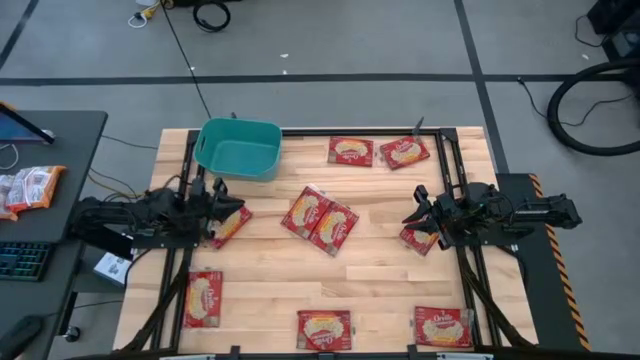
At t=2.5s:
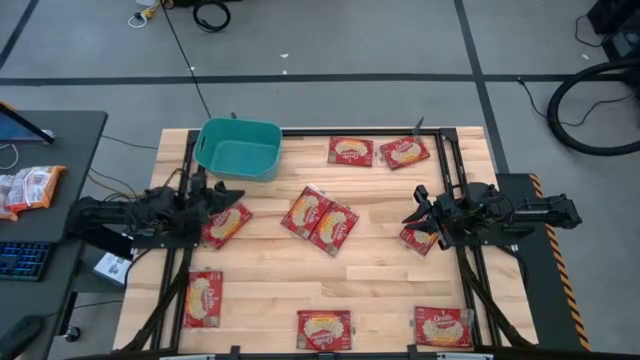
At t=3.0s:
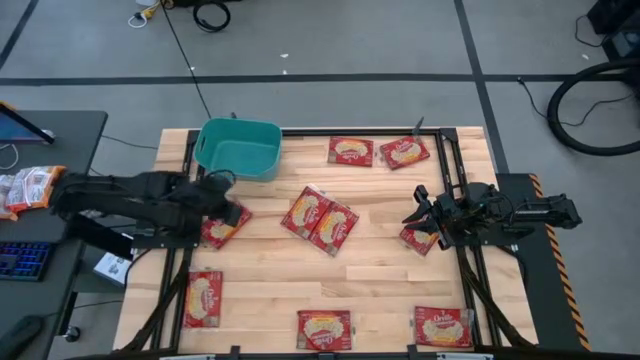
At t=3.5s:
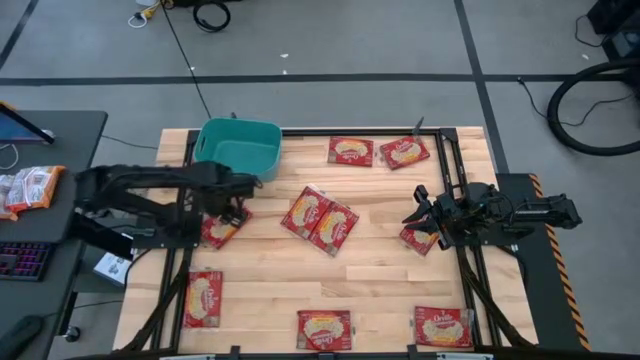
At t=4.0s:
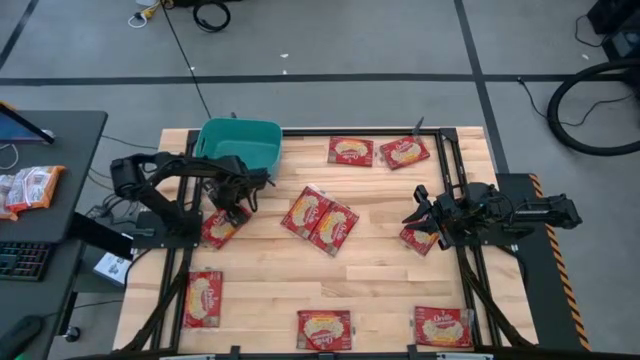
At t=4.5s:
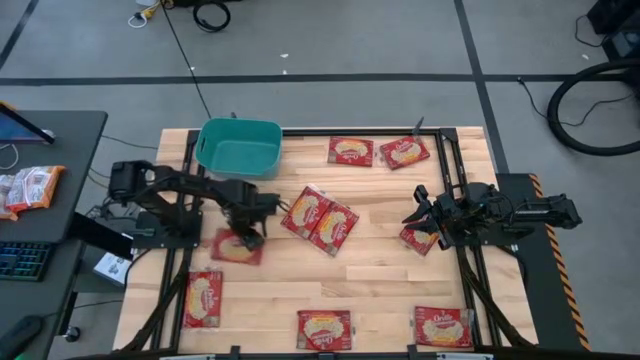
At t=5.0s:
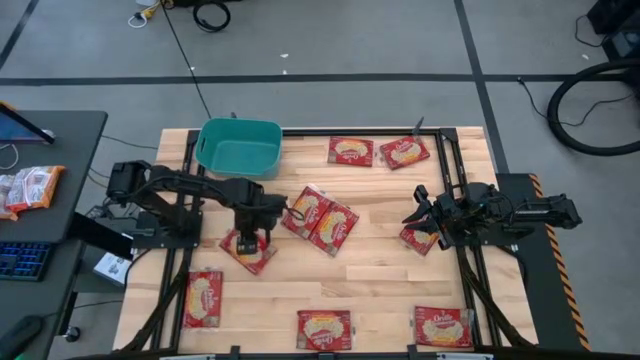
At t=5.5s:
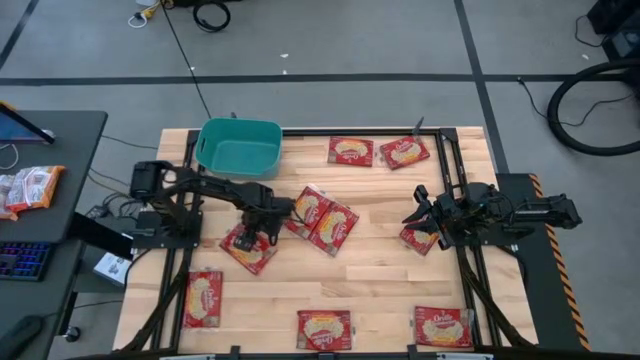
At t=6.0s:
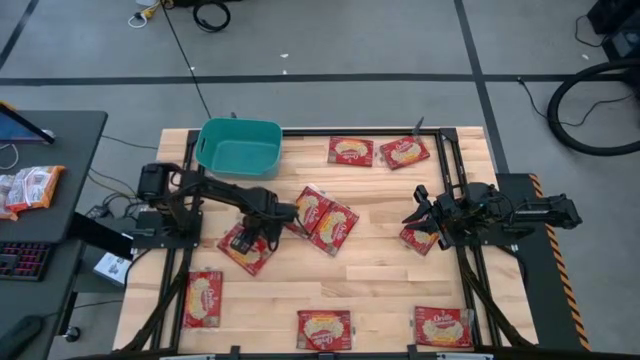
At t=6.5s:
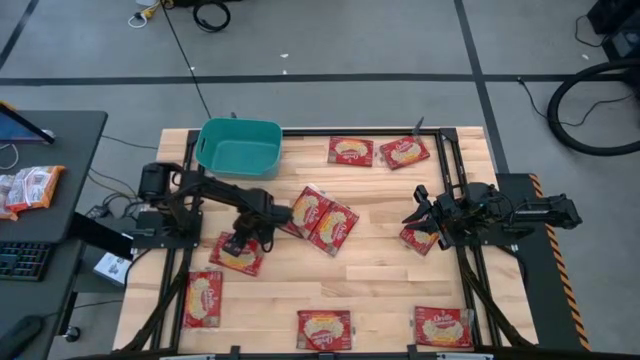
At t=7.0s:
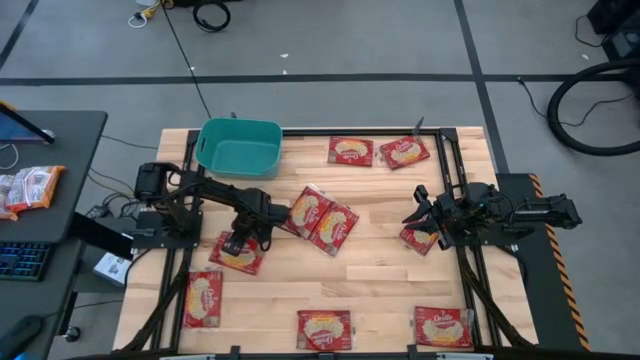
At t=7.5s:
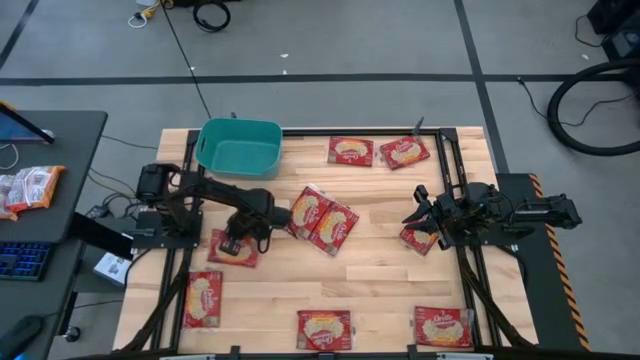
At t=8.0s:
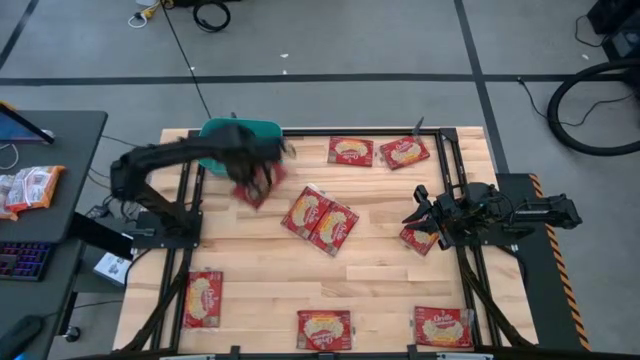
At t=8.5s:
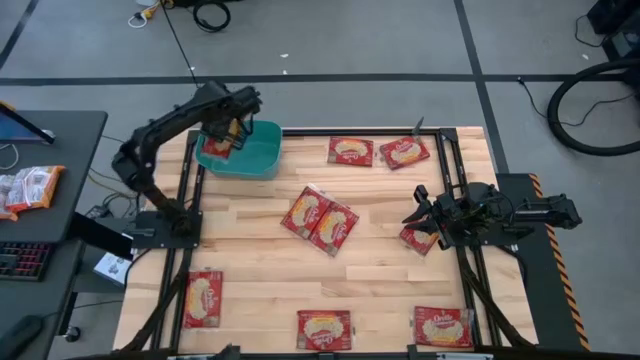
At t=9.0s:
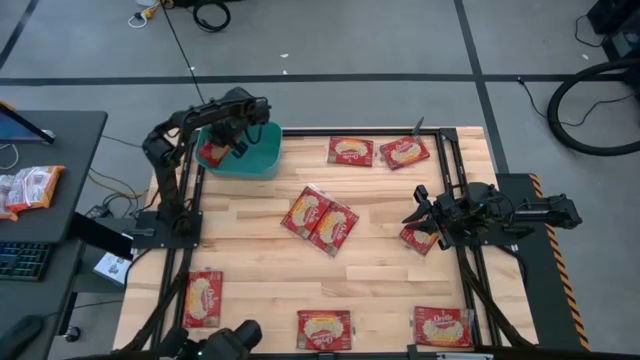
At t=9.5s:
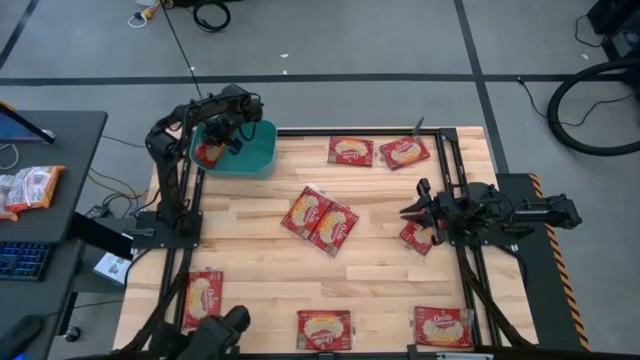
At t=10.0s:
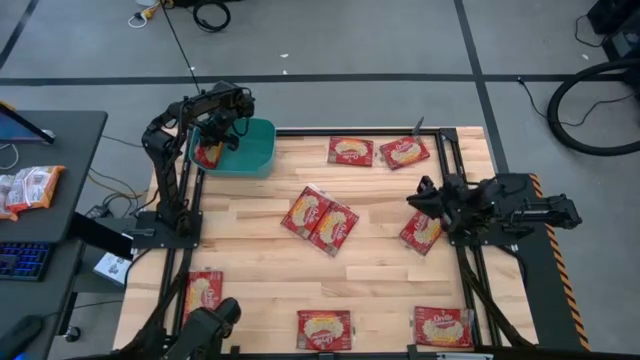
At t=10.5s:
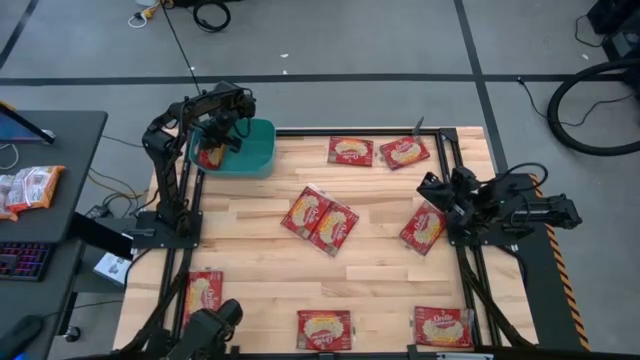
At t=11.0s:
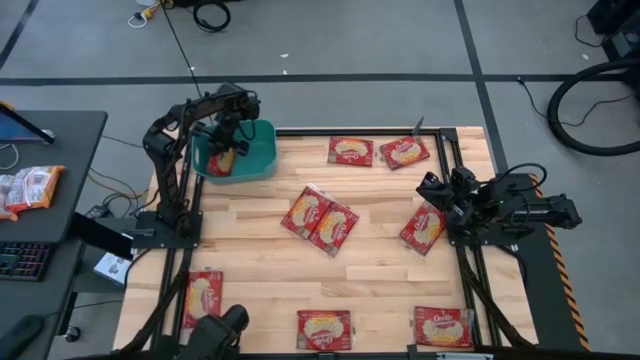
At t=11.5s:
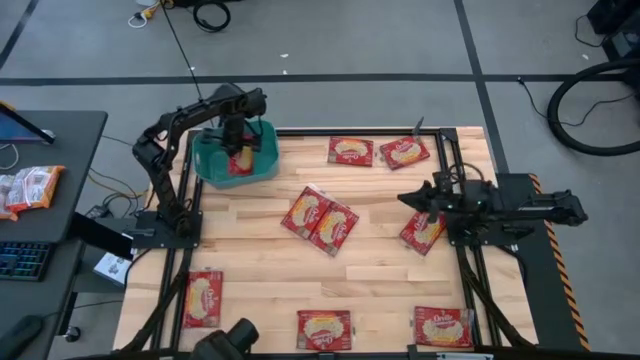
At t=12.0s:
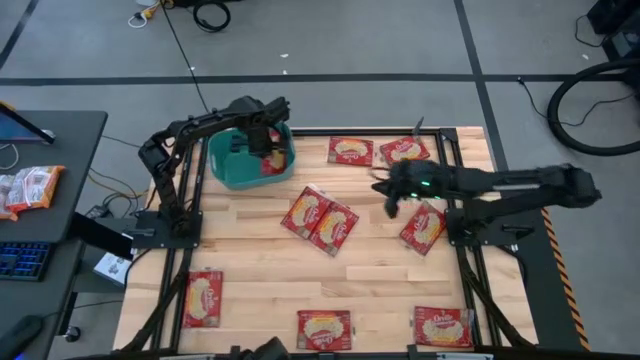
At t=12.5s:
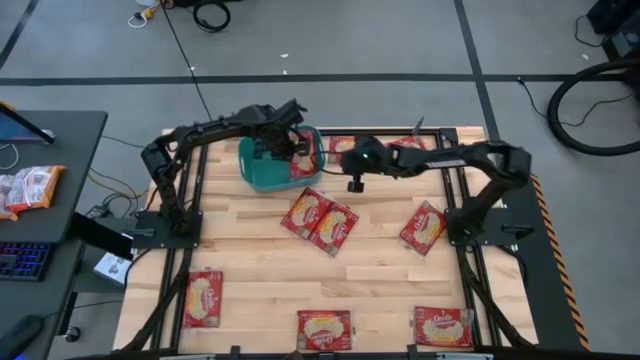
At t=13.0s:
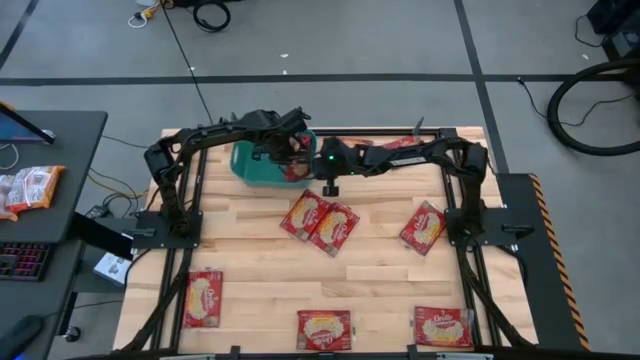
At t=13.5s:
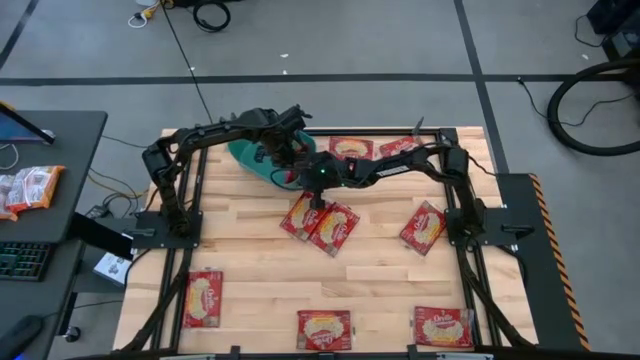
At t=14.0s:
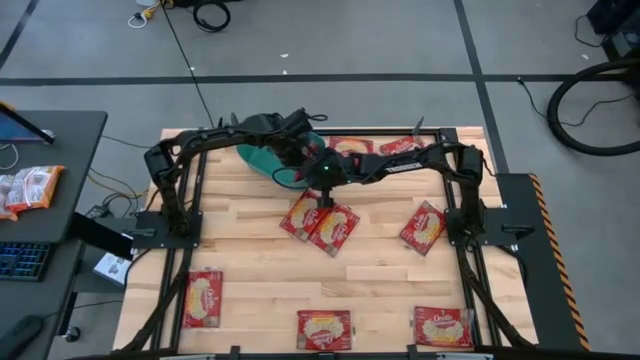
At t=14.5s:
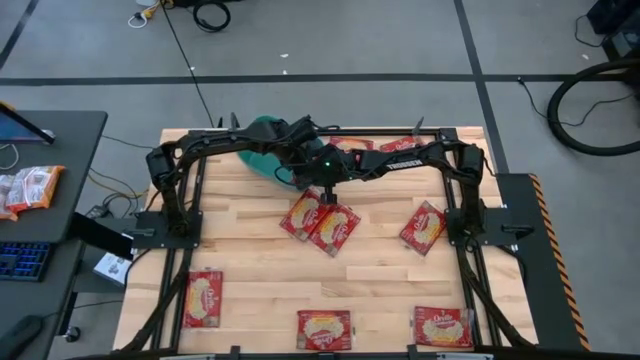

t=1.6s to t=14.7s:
Task: Sort popcorn bags into baskets
Put the popcorn bag into the green bin

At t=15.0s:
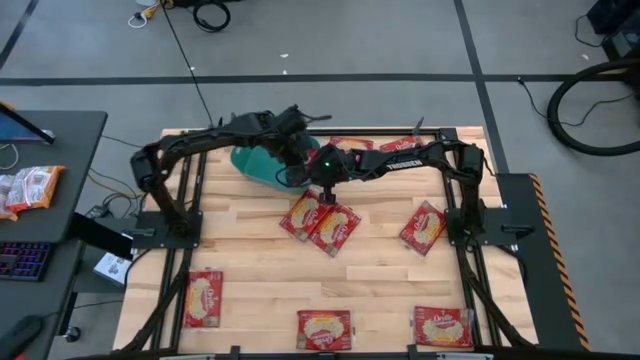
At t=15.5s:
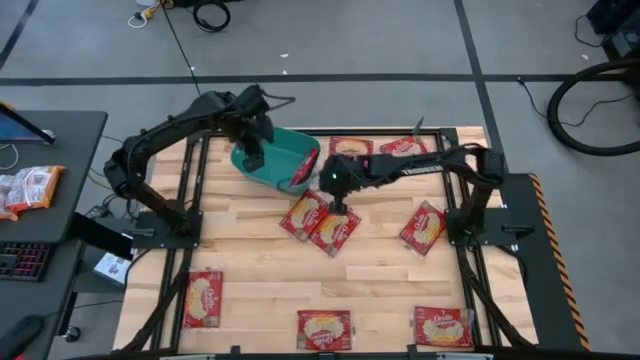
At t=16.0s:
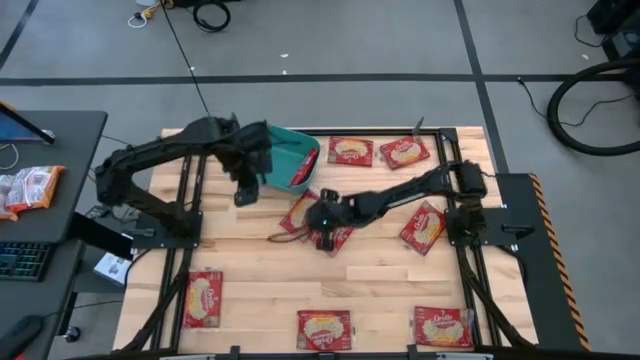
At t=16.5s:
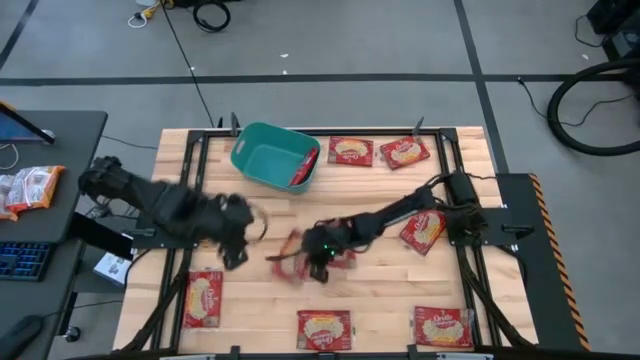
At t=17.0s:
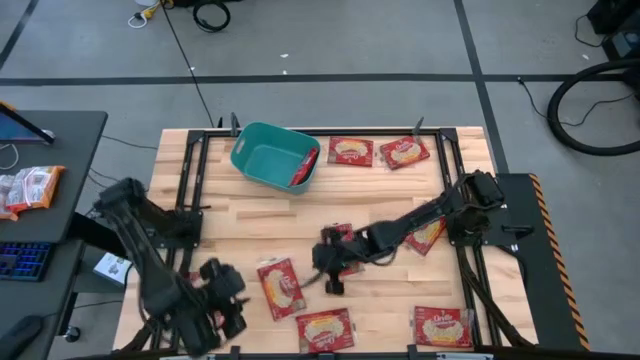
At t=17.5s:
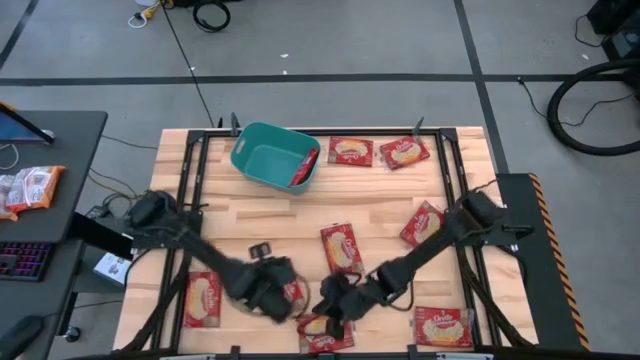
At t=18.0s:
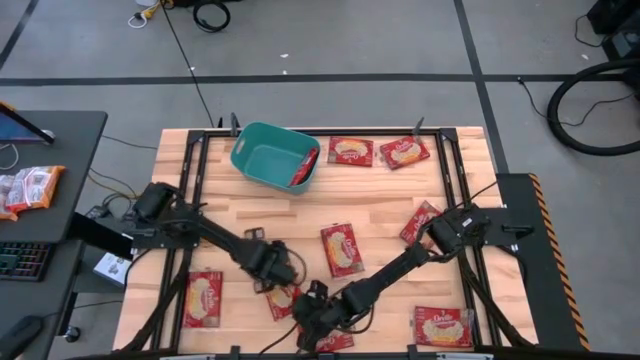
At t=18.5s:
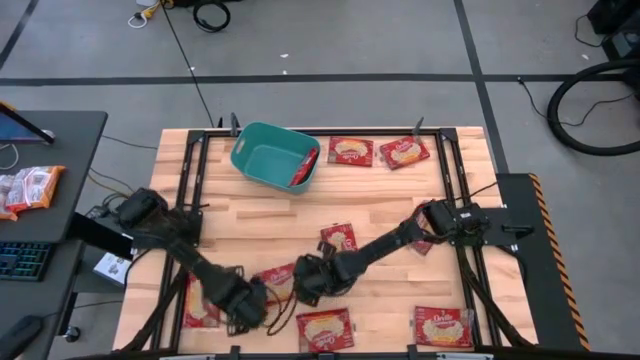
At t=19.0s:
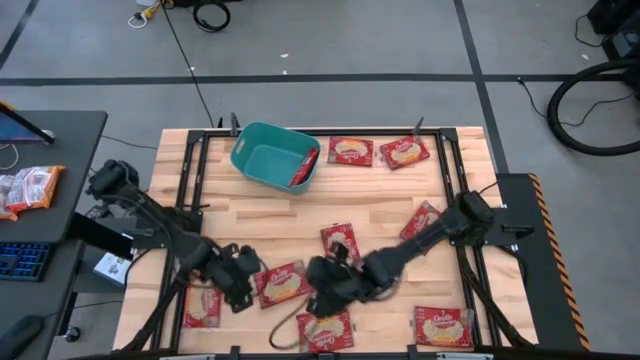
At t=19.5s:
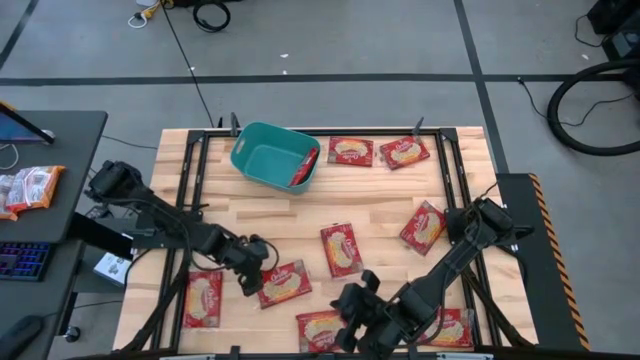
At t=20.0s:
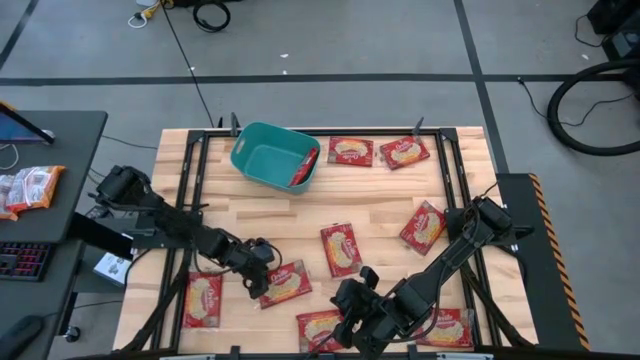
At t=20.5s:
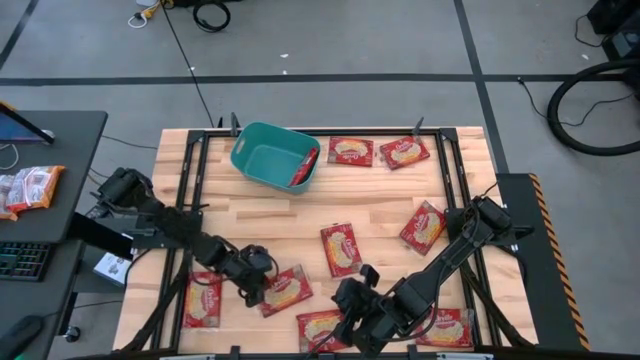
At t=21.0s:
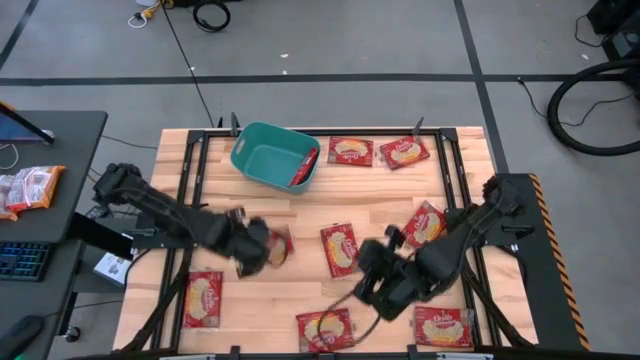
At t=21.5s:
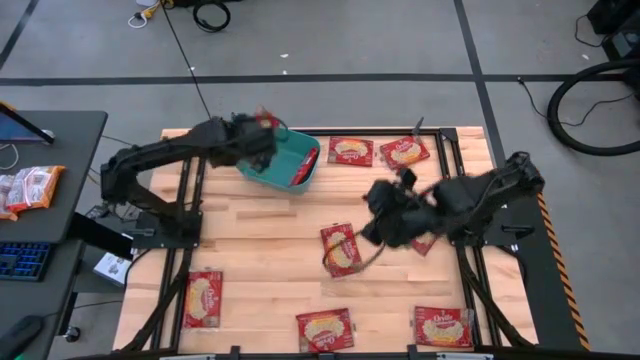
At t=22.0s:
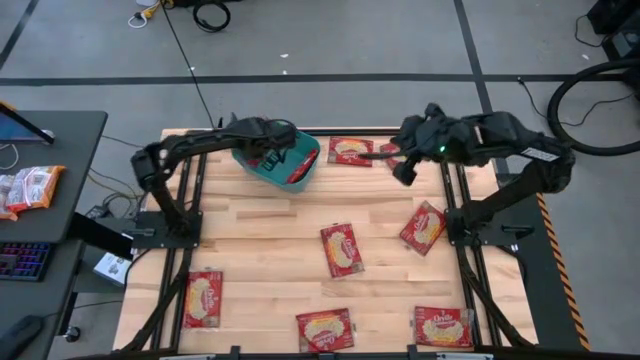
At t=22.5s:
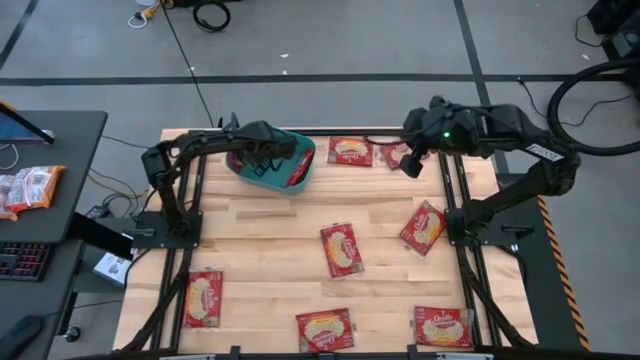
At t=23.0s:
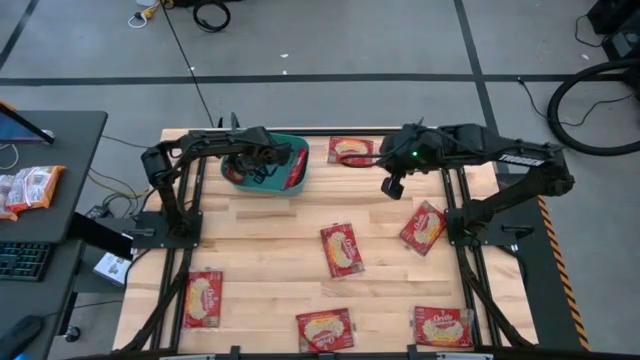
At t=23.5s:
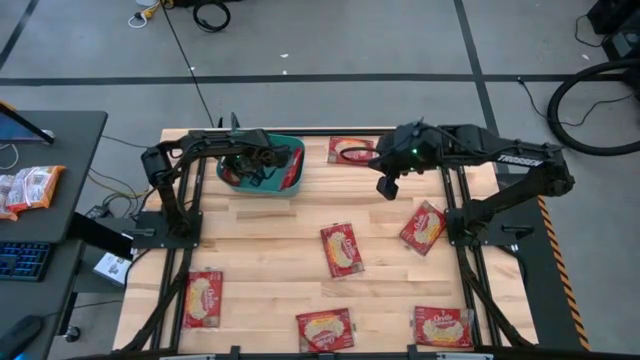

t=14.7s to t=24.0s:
Put the popcorn bag into the green bin
